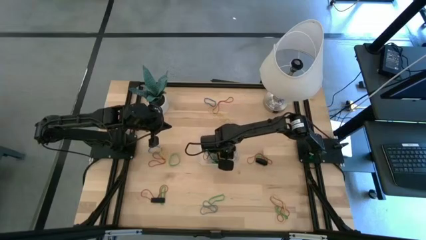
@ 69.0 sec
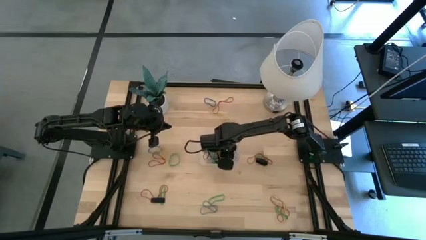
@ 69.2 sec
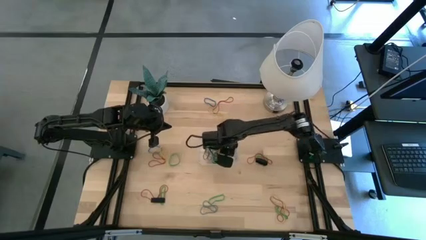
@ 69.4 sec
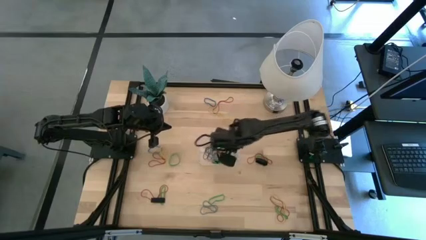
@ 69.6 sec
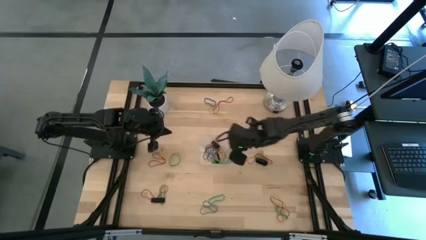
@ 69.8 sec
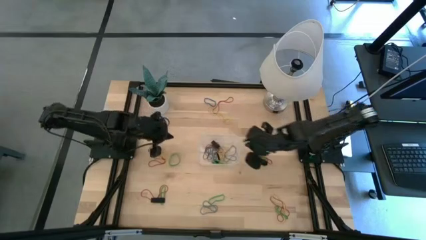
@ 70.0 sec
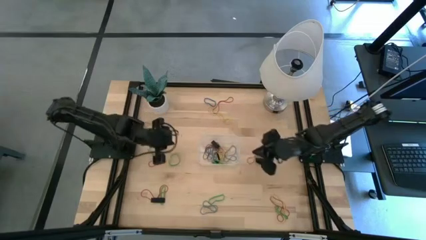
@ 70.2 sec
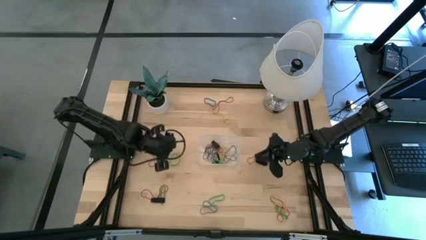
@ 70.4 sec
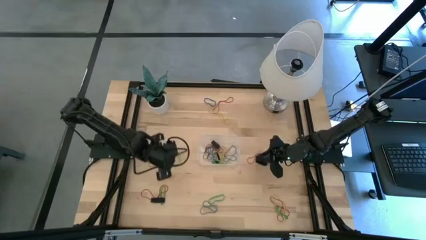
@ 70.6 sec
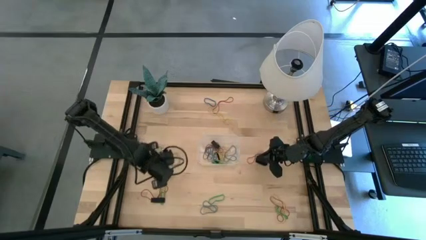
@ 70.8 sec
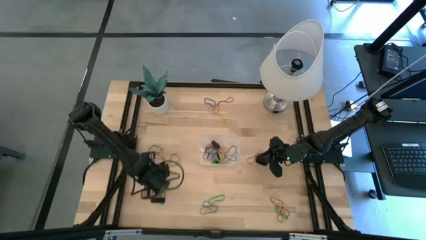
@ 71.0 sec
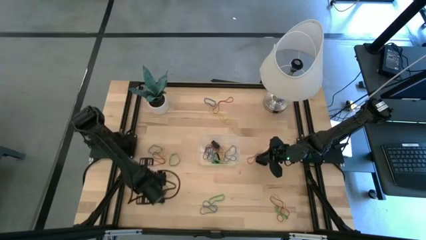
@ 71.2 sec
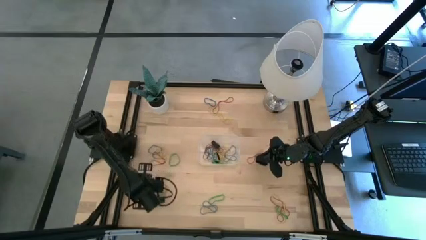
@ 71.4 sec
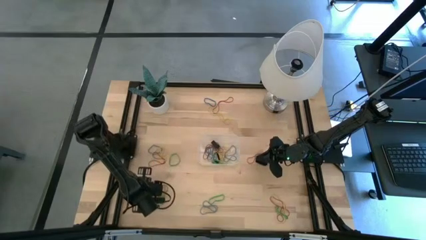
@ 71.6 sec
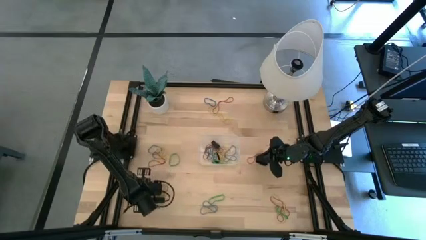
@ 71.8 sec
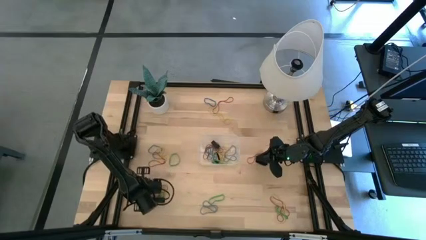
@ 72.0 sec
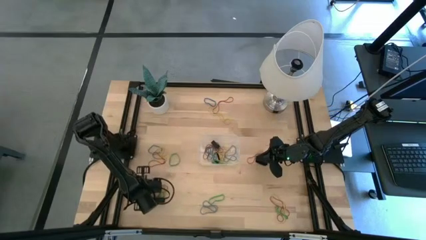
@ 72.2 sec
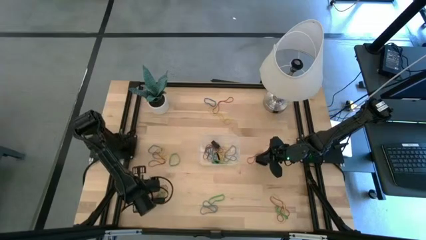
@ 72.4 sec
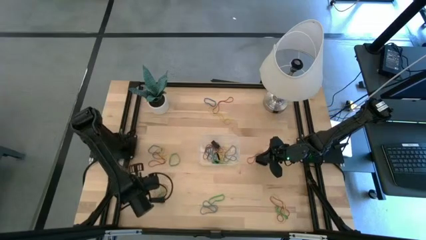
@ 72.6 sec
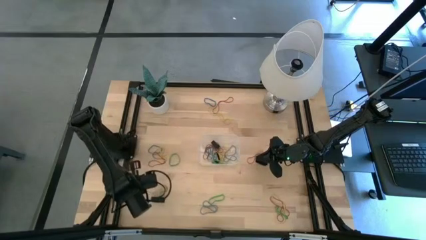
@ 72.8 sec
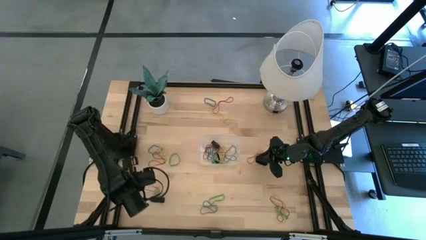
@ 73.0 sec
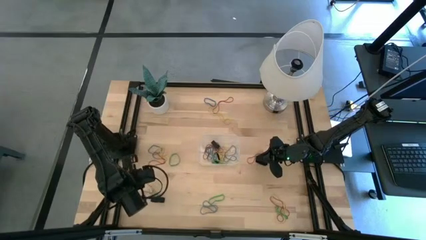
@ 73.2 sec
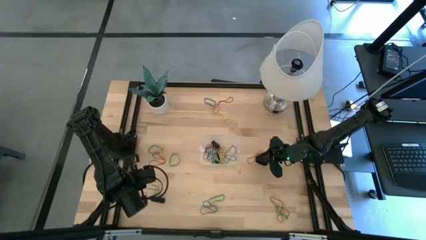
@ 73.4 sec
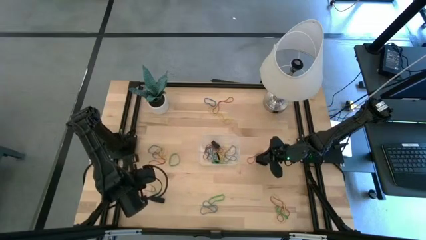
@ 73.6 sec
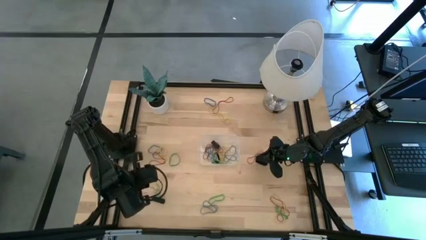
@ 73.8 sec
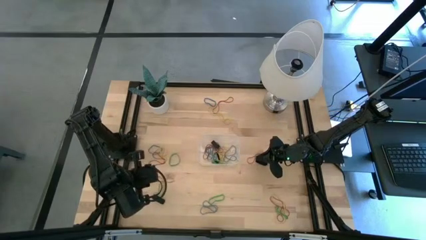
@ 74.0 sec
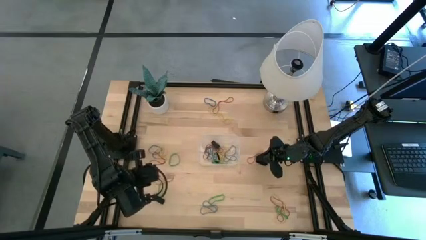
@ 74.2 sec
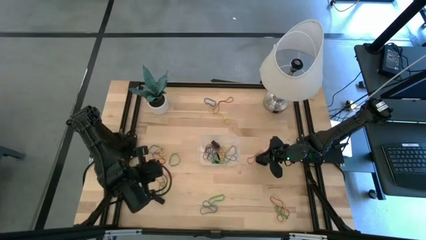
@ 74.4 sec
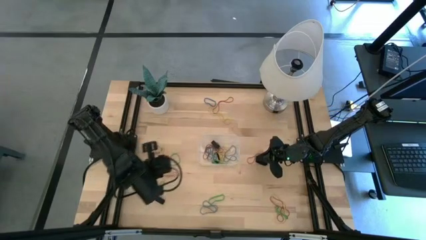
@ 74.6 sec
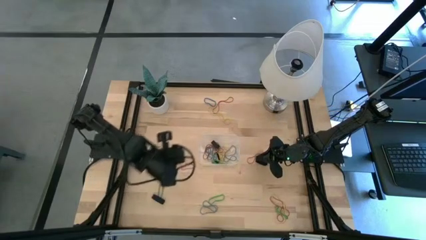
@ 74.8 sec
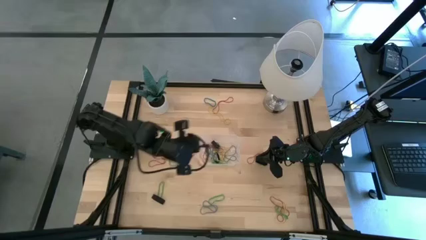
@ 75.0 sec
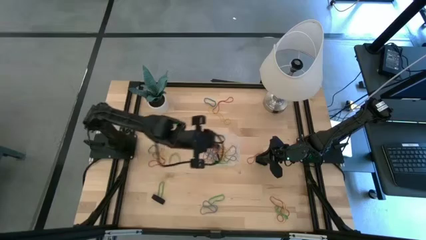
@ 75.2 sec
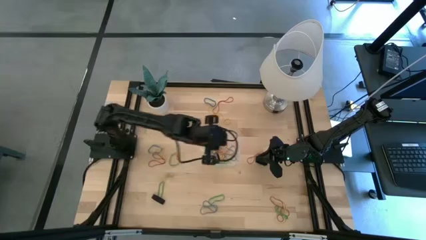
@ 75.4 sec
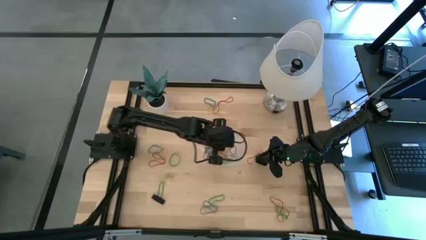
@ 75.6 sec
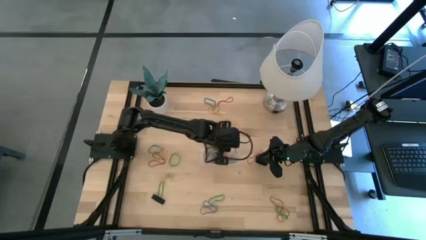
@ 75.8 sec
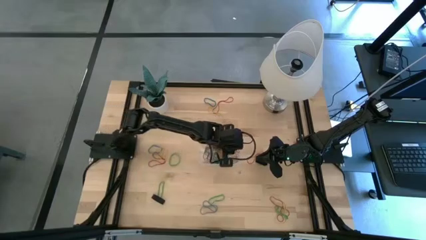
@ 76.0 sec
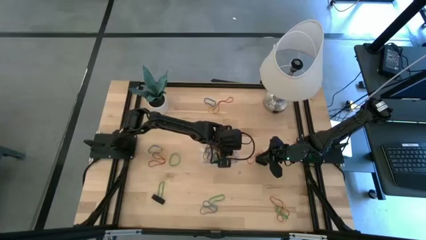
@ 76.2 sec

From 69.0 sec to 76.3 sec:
Task: Pick and place rubber bands into bin
Put the red rubber band into the transparent bin

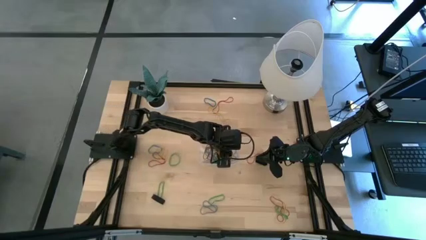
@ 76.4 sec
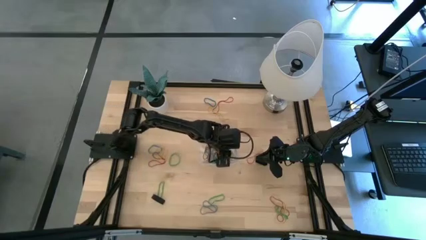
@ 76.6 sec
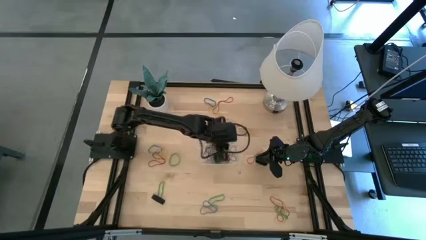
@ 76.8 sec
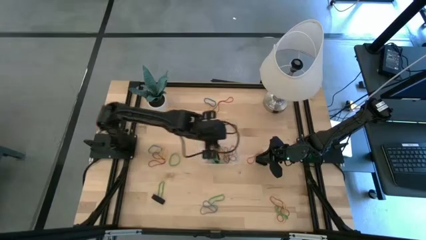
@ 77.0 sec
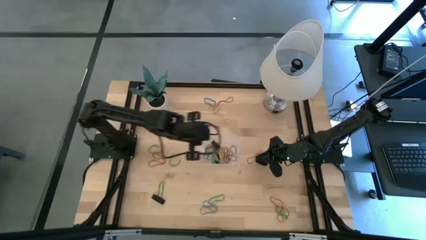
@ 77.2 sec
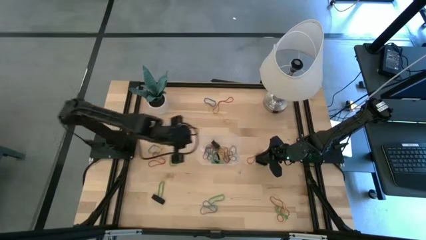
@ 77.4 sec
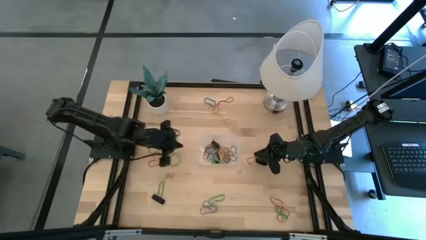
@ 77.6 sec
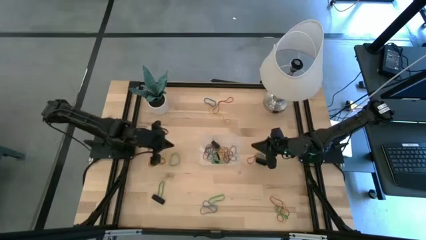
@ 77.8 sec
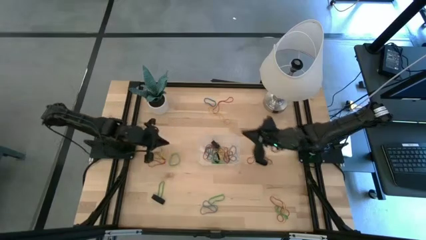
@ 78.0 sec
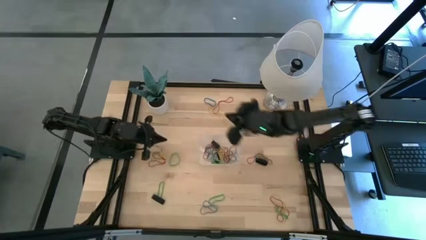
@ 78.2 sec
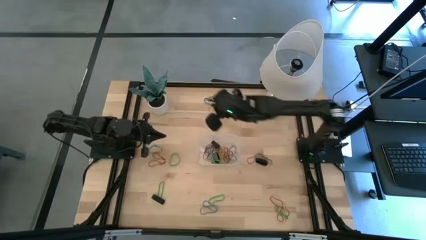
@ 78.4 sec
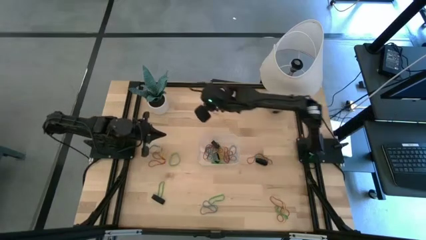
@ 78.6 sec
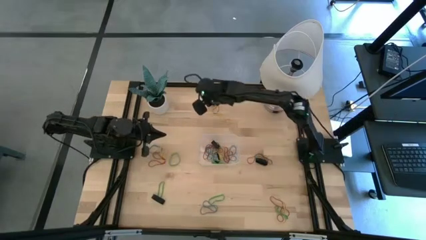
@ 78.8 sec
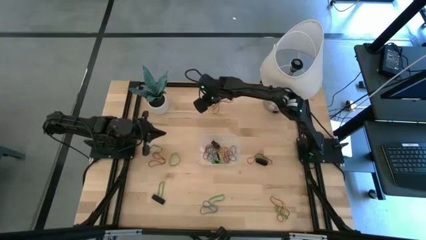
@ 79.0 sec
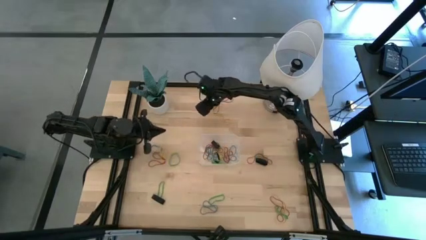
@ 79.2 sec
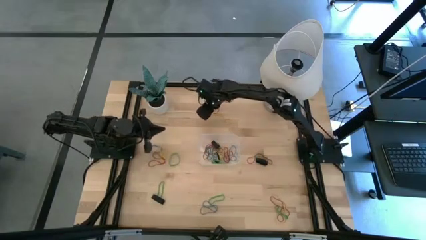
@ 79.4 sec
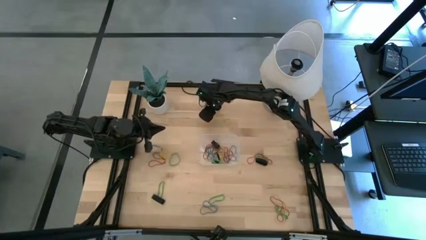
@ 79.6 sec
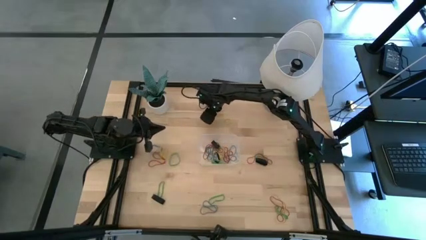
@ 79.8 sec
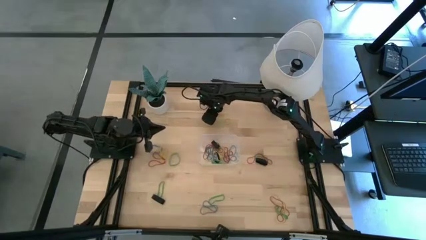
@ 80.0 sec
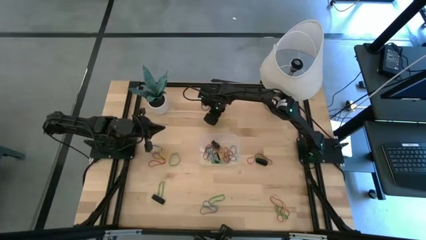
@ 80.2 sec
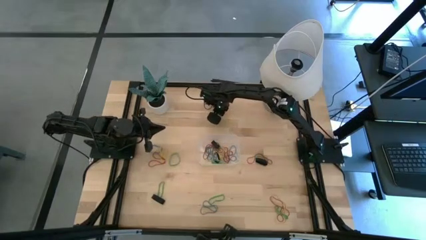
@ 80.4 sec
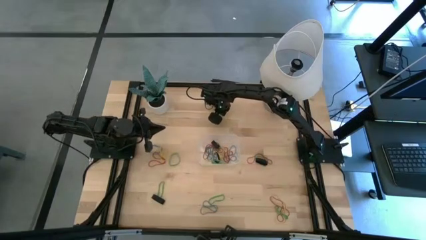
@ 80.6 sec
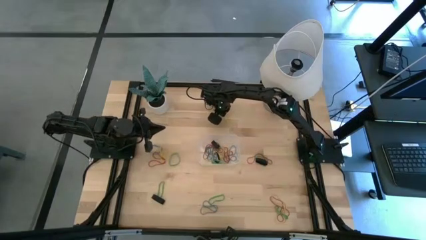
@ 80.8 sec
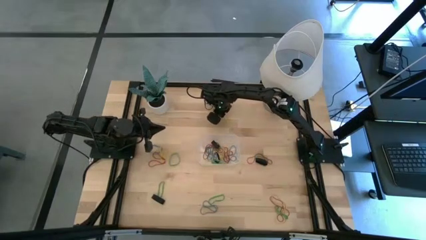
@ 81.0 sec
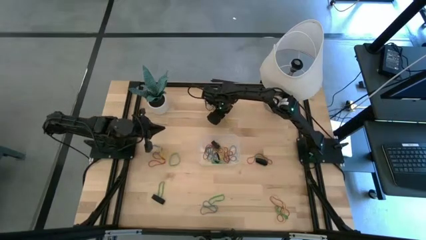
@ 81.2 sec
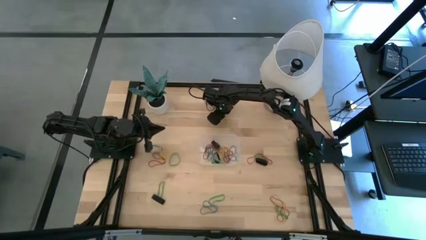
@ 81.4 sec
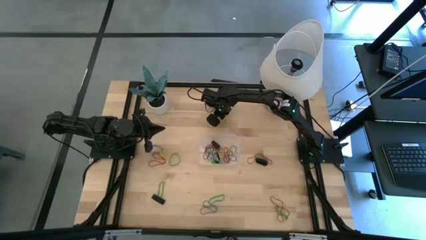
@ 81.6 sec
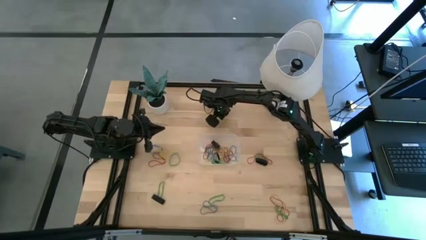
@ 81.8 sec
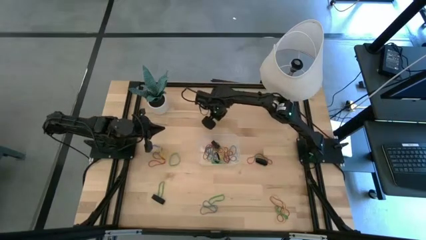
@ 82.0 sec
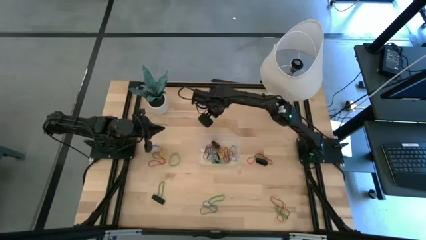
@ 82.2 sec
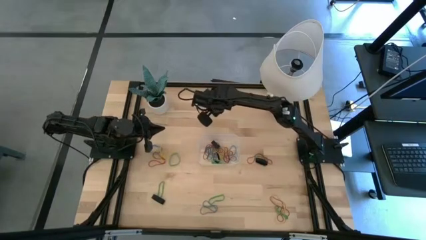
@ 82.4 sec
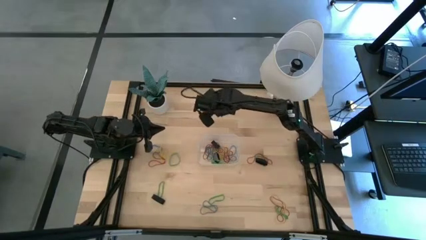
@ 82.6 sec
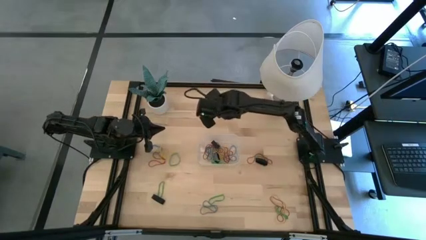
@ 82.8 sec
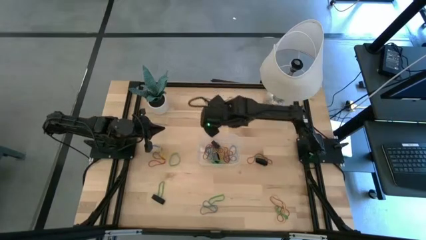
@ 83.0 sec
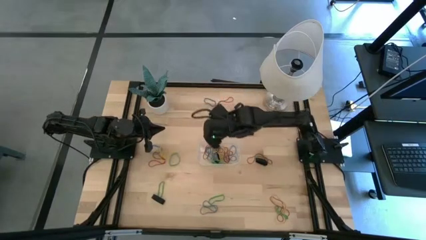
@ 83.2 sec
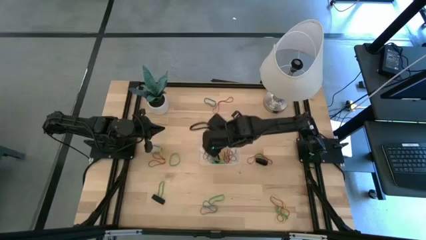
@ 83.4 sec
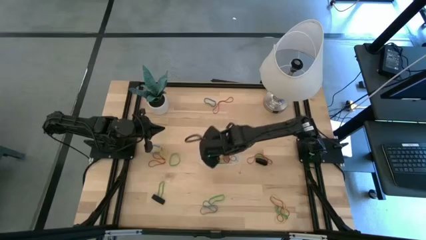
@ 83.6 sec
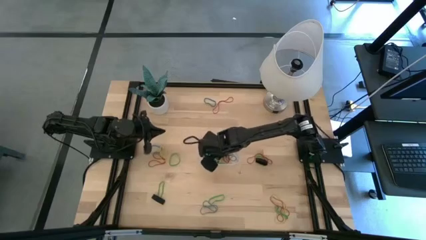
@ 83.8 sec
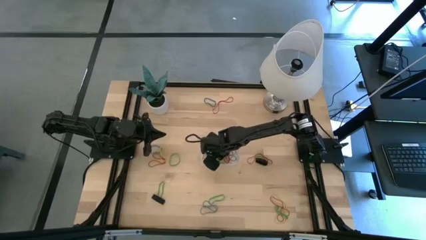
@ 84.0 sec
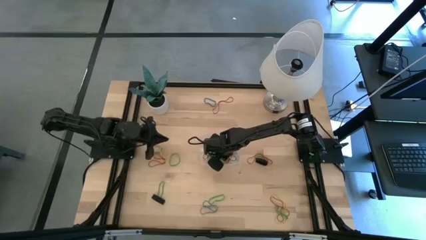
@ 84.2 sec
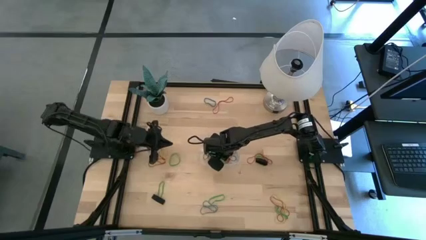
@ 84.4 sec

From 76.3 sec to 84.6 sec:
Put the yellow rubber band into the transparent bin
